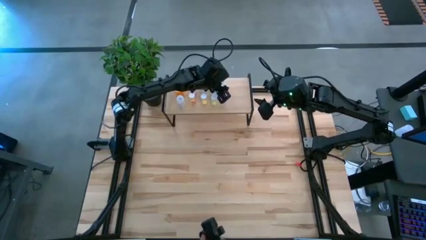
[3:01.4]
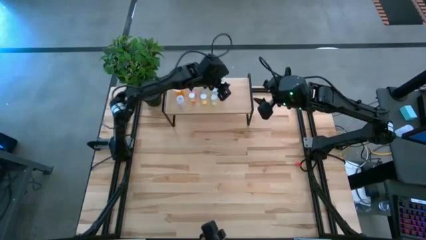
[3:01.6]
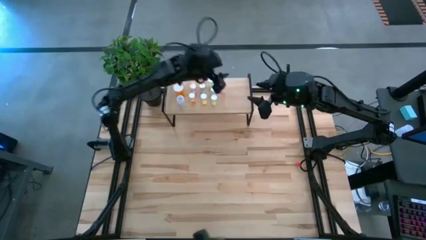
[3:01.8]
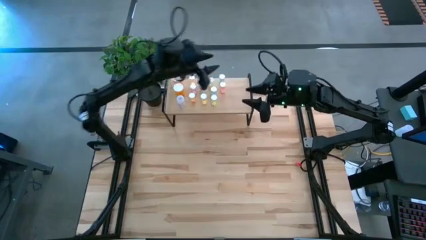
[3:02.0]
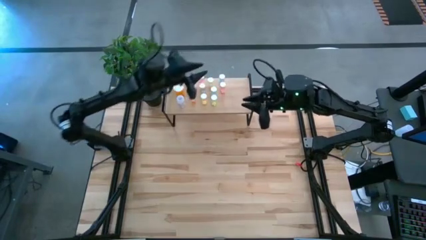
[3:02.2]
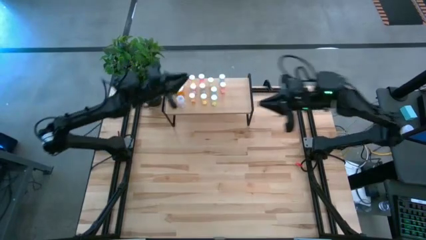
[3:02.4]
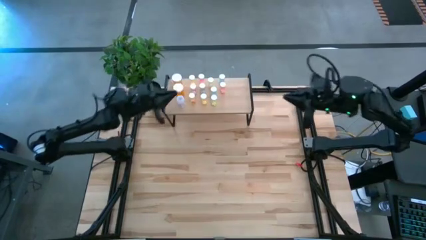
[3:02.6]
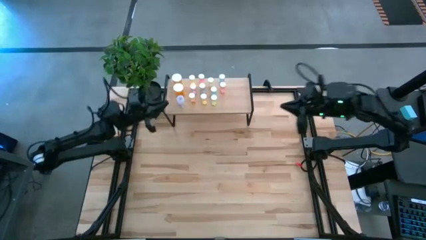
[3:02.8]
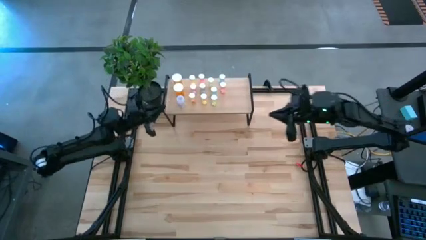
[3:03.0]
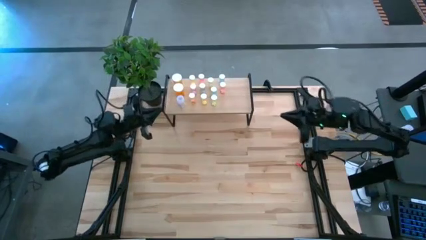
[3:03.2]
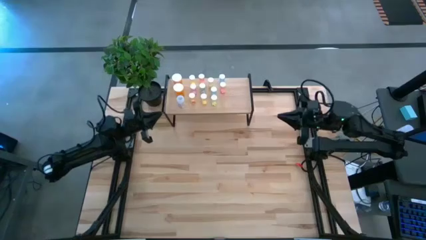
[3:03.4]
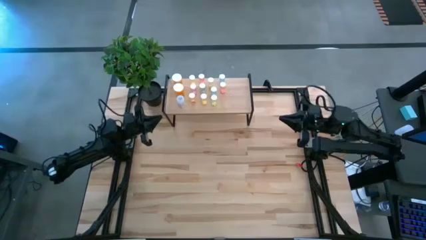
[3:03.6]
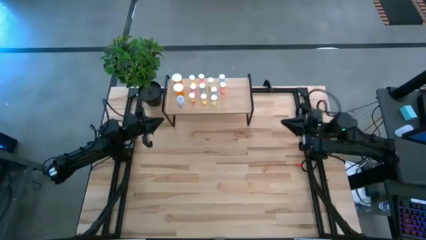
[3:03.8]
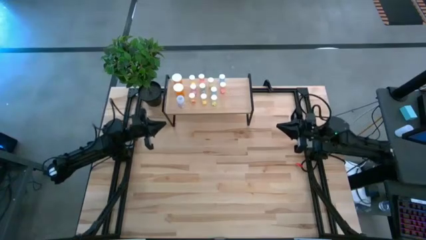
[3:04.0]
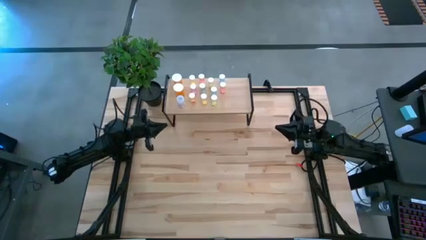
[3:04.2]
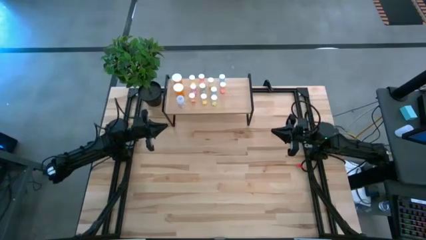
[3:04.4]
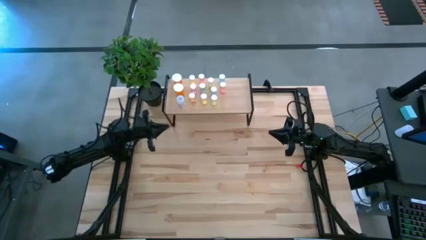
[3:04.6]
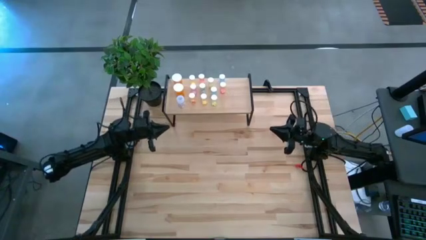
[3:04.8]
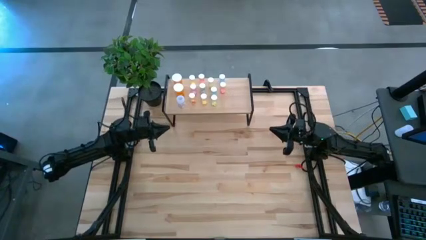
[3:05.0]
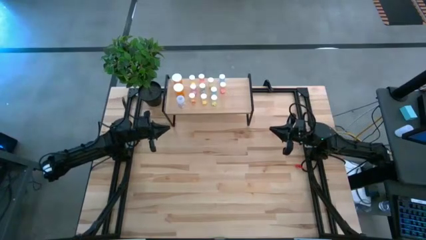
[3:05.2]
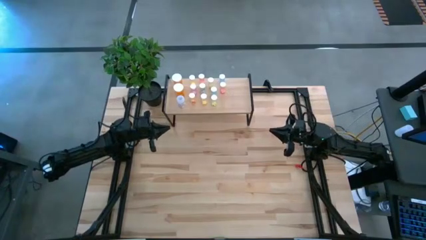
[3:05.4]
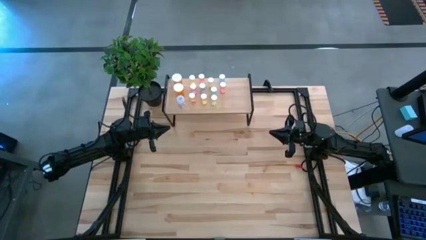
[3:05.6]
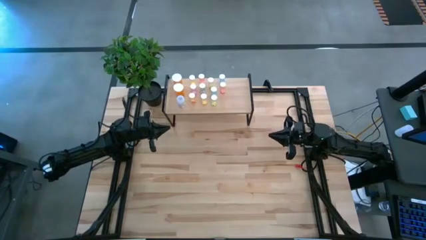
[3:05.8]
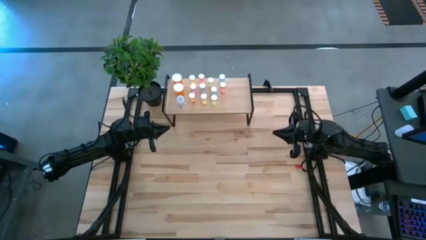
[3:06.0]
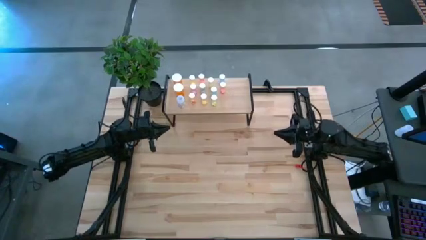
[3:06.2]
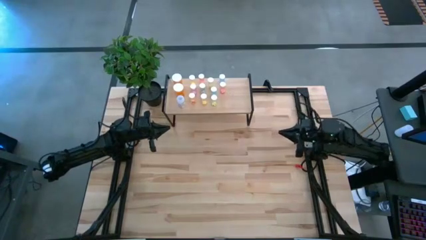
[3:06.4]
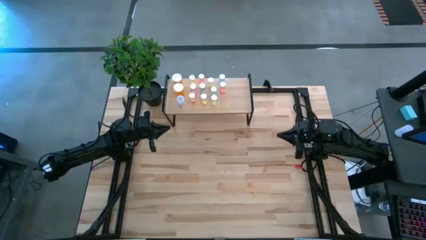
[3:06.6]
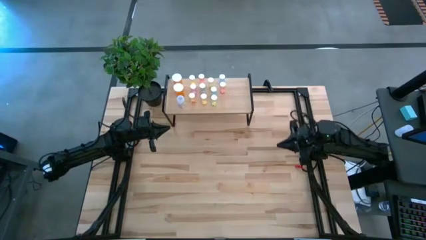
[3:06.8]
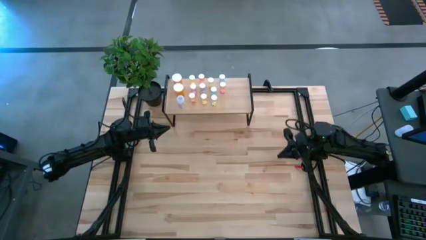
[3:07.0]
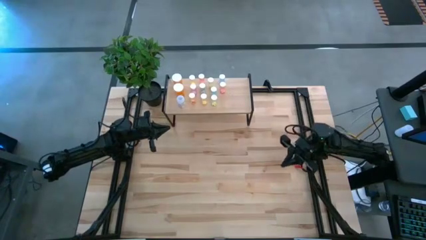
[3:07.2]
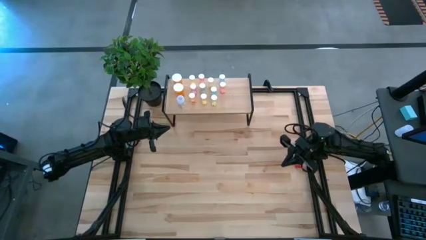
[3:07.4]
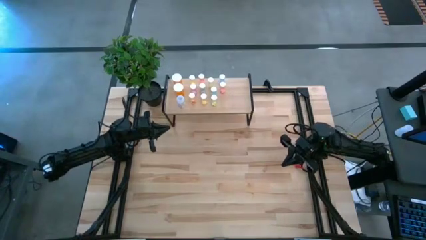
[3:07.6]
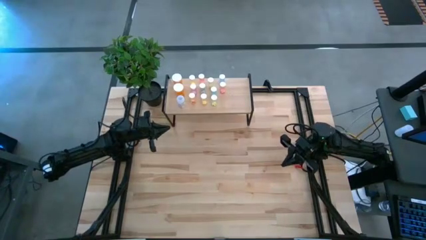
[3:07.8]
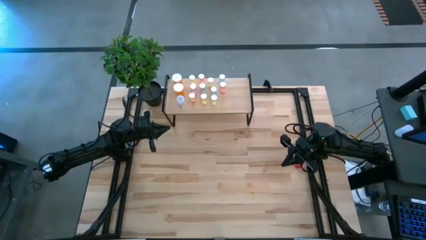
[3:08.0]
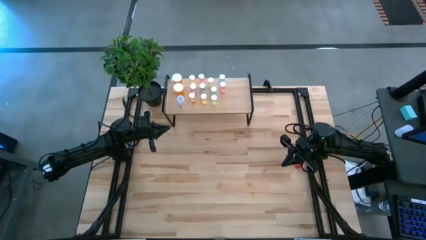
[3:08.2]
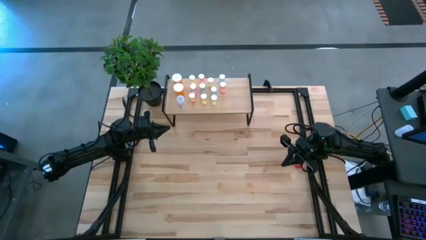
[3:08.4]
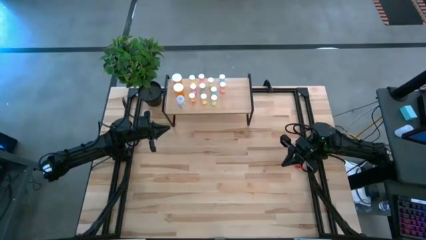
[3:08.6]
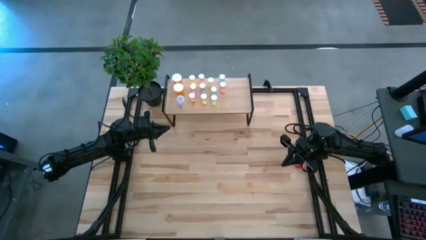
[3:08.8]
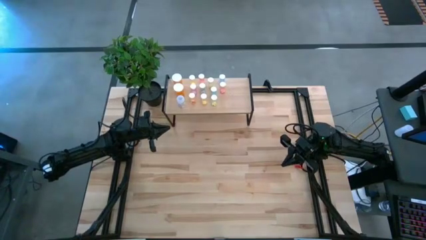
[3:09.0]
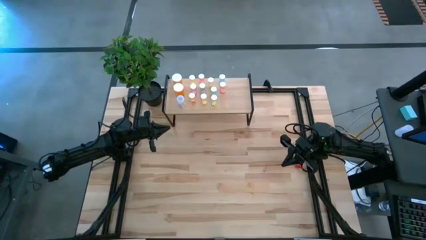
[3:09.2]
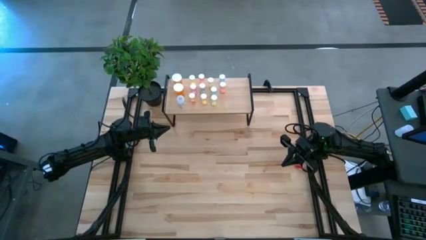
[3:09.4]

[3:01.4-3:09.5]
Task: Pick and place medicine bottles onto shelf by color
Return to Home Position

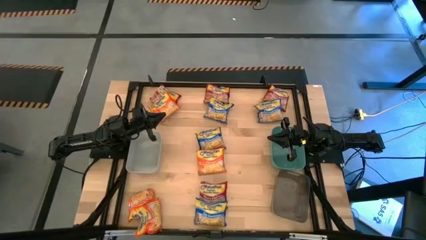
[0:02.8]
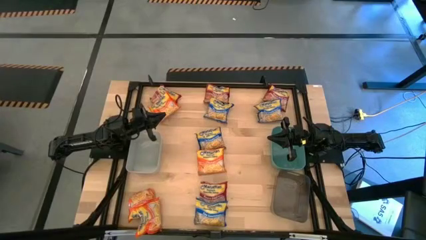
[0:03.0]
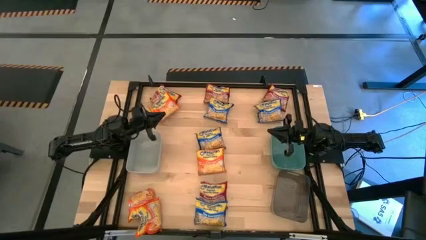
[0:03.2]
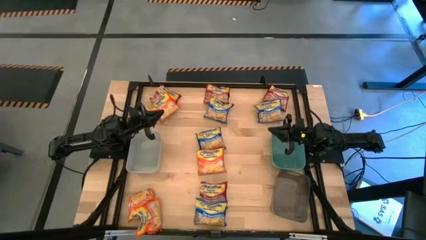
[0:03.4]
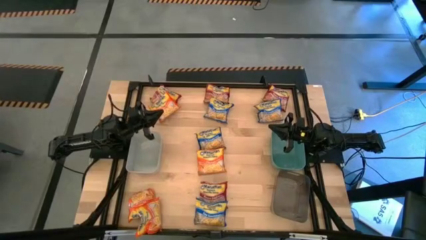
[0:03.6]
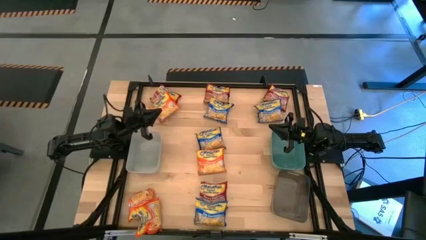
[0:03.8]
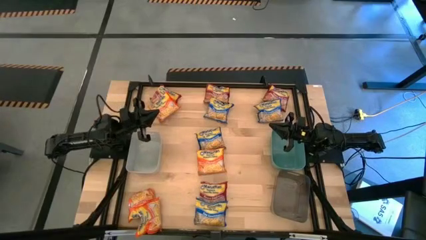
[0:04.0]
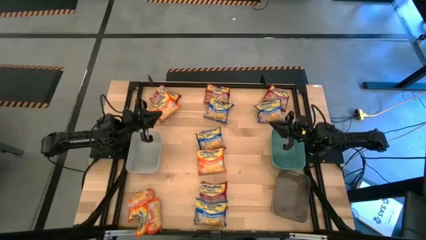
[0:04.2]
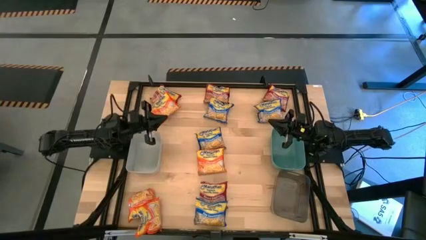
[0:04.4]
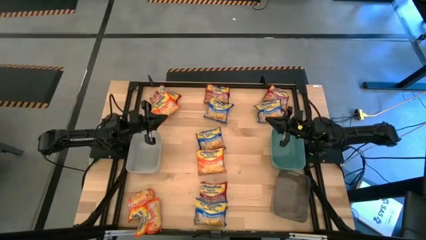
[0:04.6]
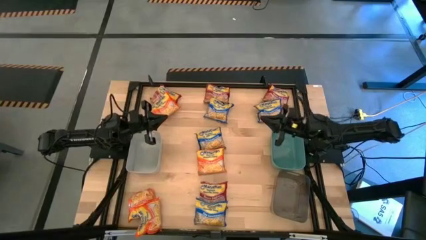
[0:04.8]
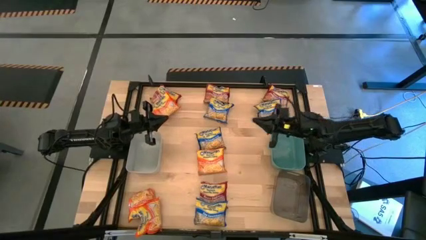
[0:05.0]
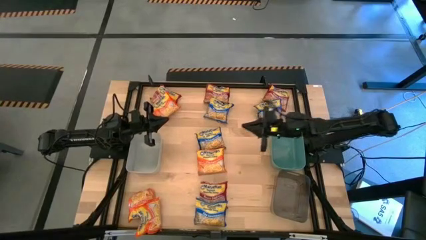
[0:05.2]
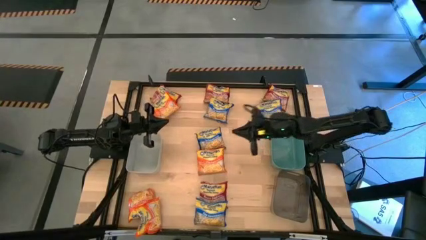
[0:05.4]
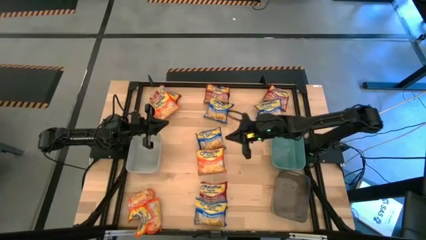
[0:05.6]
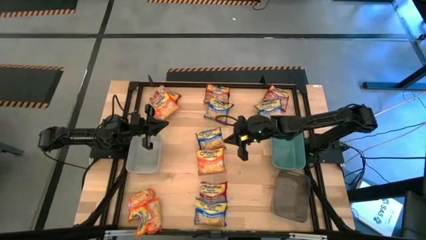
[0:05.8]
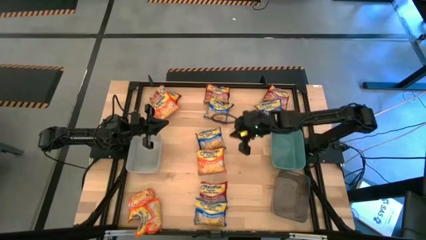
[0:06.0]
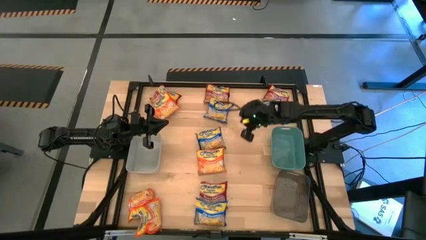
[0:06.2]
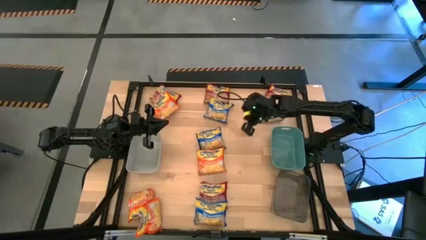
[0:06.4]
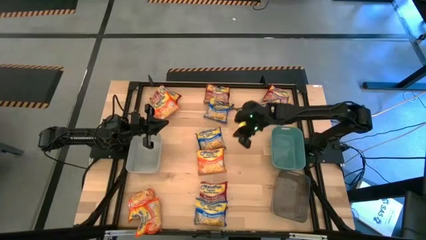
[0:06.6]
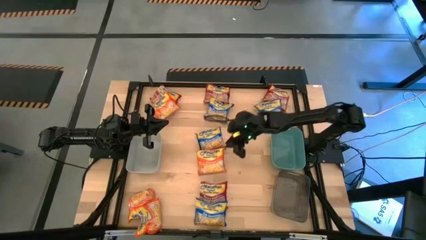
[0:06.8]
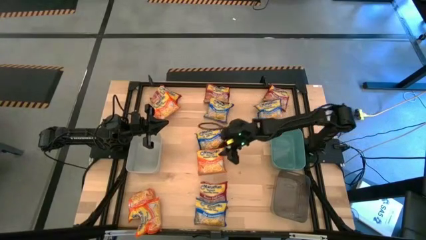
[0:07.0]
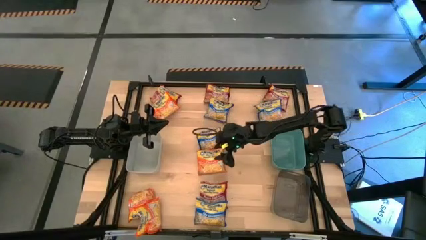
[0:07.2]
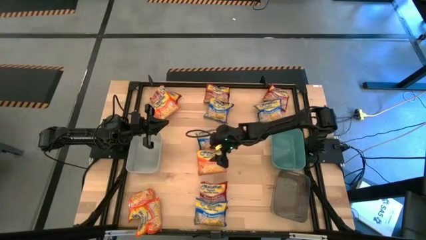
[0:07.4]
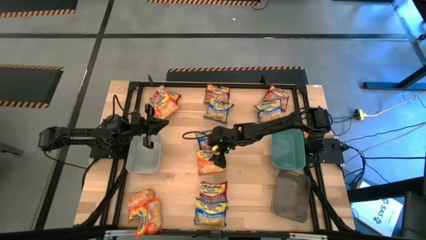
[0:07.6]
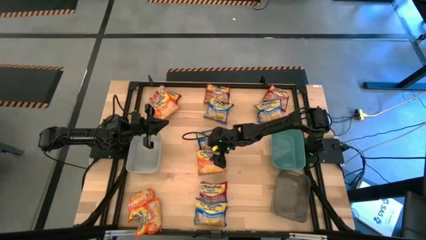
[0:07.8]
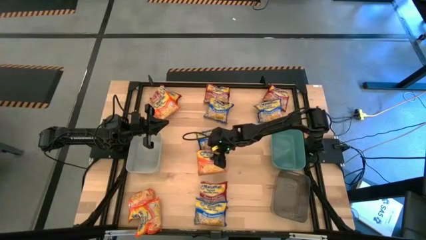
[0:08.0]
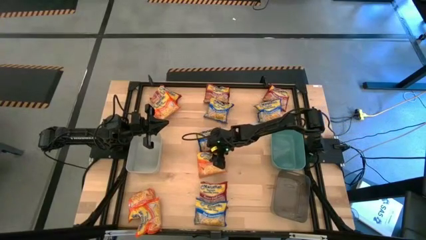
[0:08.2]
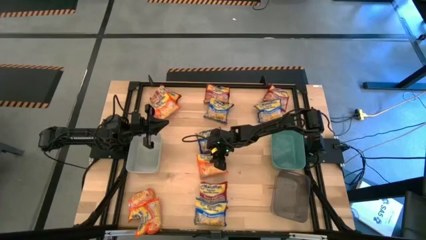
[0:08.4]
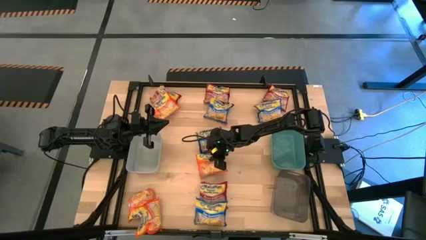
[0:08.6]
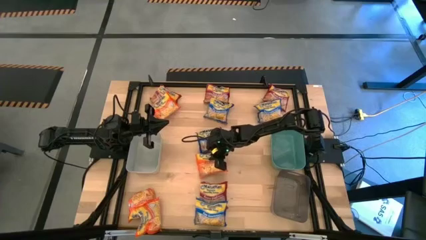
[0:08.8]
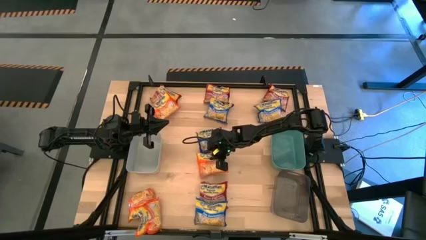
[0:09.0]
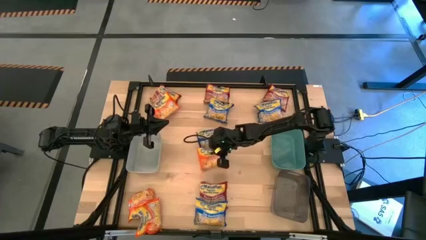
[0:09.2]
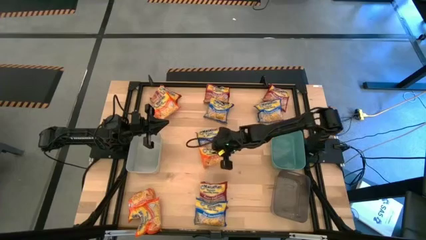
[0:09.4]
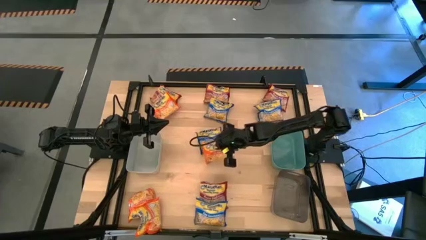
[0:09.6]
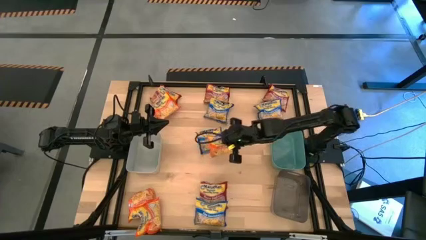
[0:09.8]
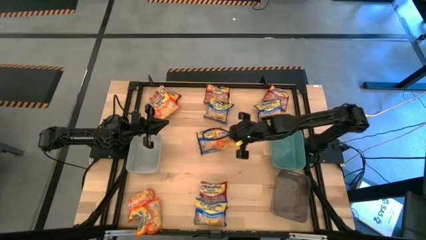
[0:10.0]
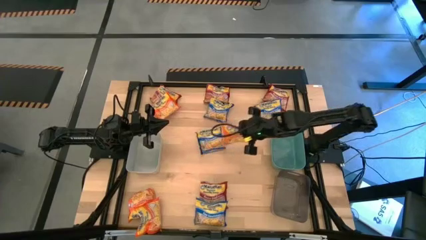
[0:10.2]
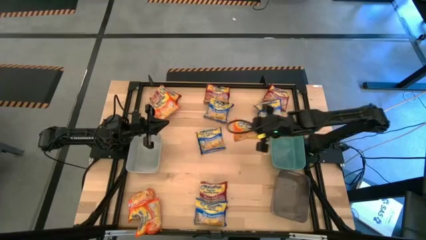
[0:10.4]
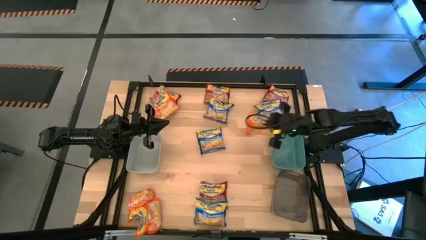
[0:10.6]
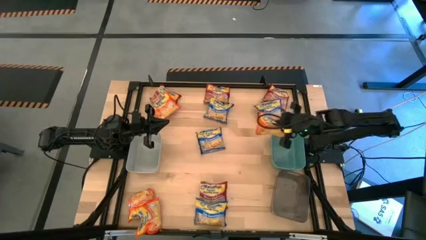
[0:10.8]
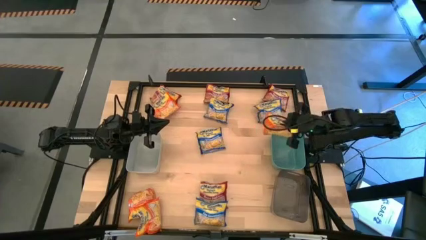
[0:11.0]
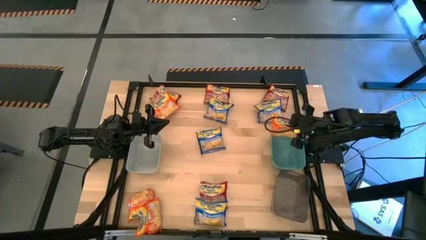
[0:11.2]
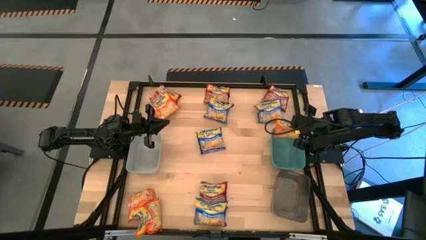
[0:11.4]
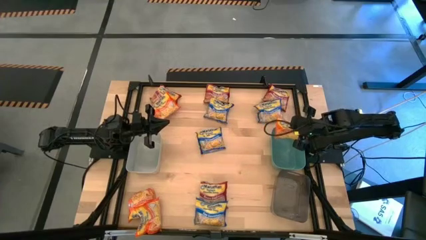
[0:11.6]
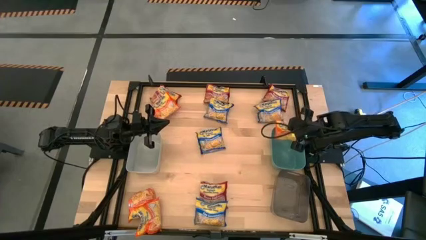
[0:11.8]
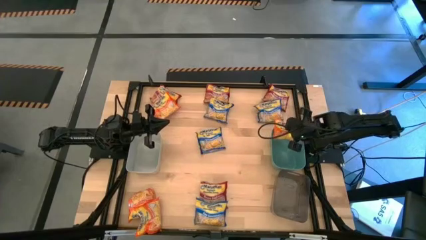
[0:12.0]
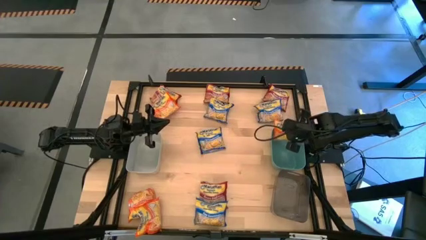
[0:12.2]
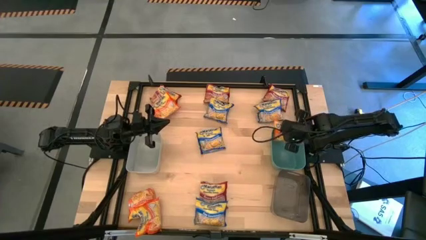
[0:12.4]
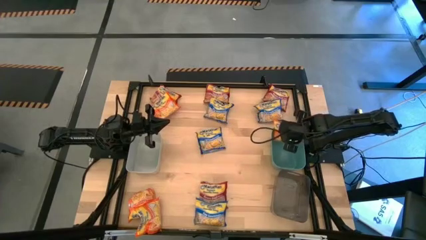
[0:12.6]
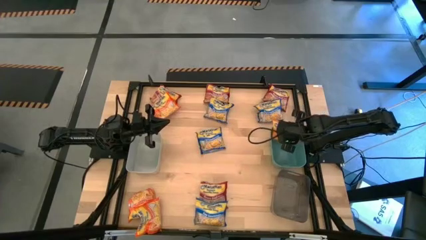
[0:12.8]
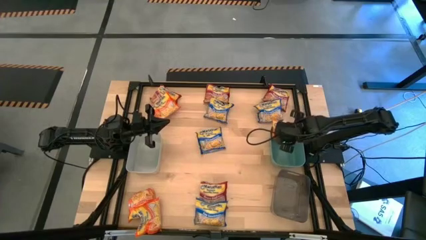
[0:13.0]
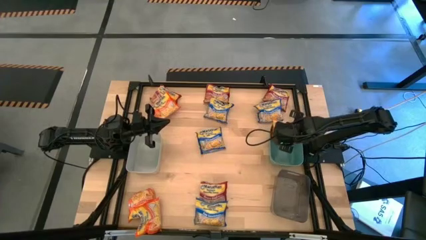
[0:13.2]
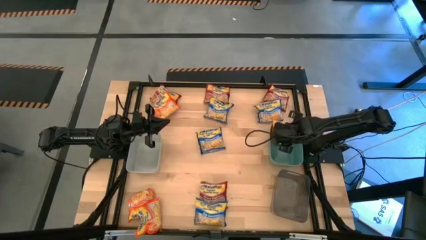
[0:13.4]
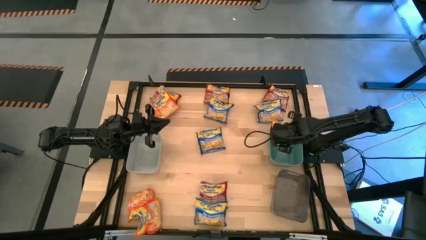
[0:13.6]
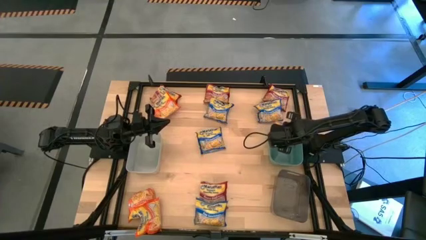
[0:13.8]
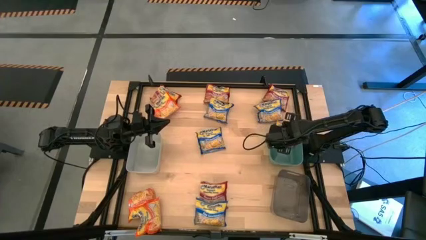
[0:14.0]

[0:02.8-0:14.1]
Task: Sort Maruchan noodles
Put the orange noodle pack into the green bin
